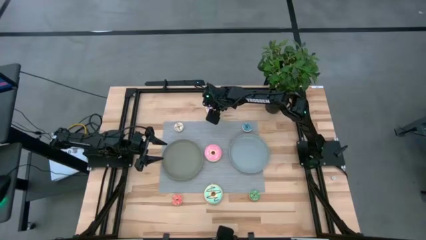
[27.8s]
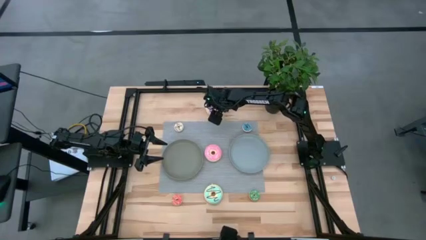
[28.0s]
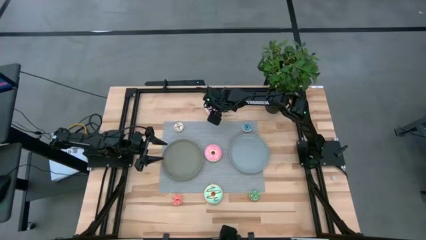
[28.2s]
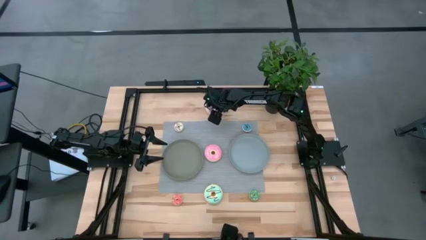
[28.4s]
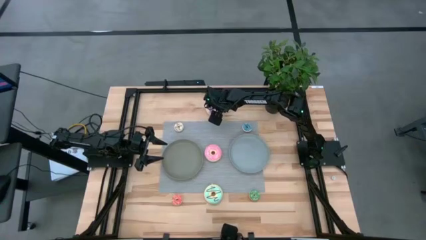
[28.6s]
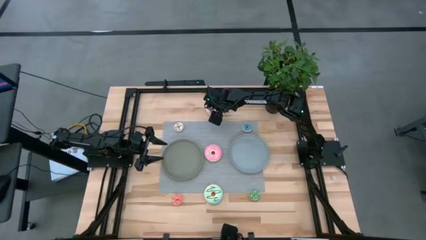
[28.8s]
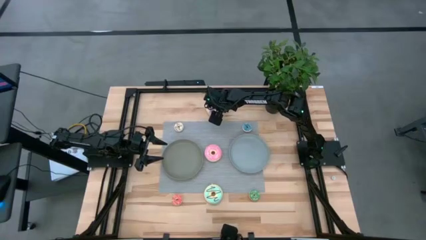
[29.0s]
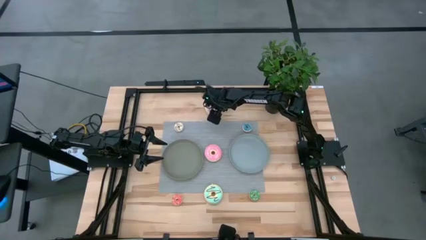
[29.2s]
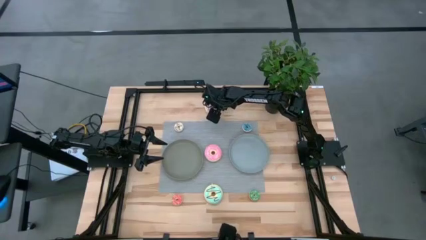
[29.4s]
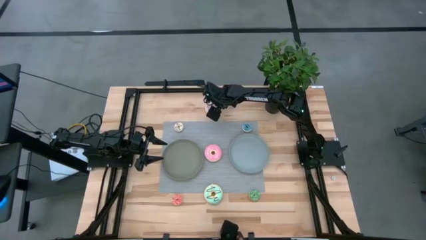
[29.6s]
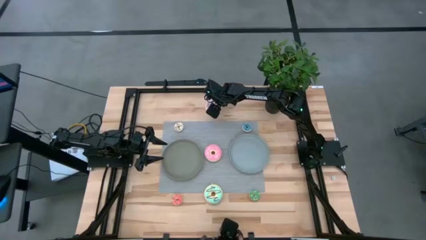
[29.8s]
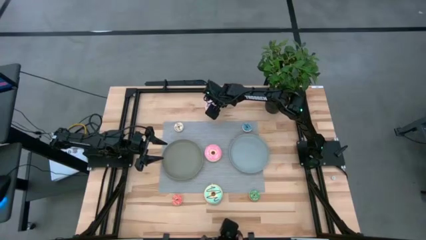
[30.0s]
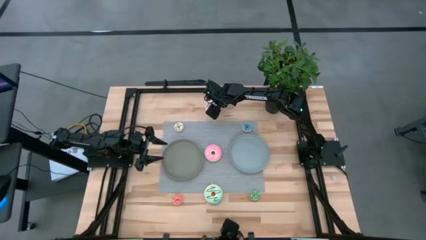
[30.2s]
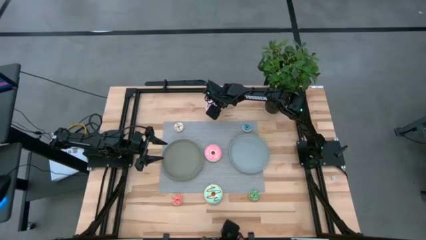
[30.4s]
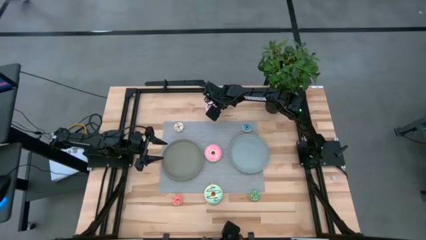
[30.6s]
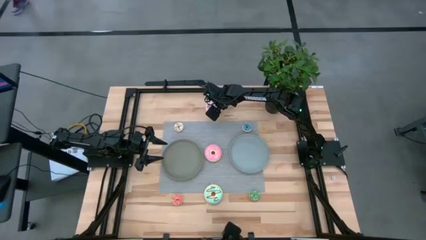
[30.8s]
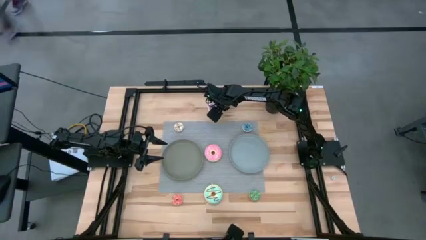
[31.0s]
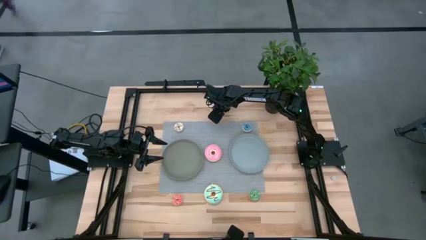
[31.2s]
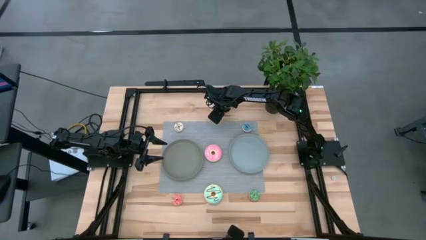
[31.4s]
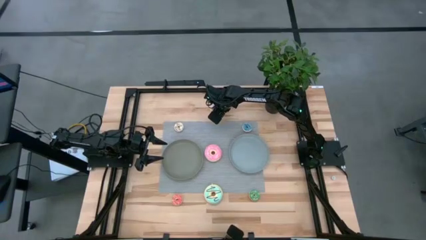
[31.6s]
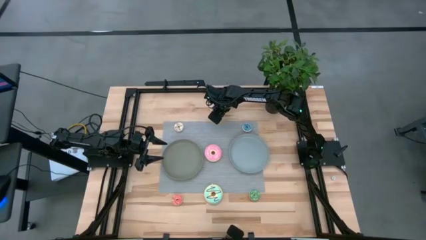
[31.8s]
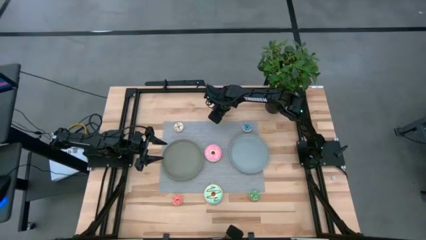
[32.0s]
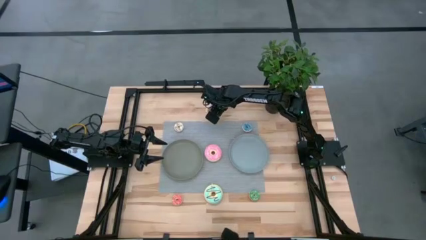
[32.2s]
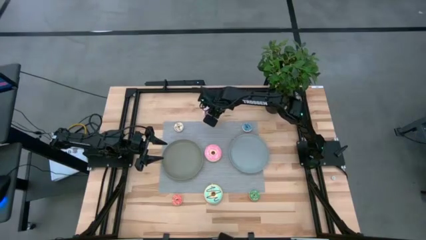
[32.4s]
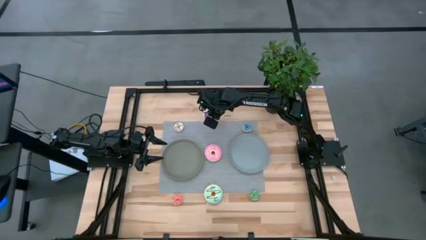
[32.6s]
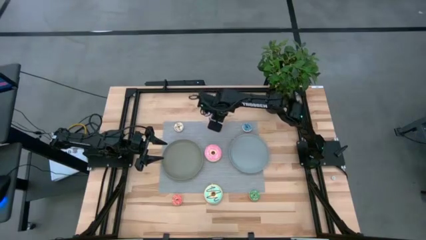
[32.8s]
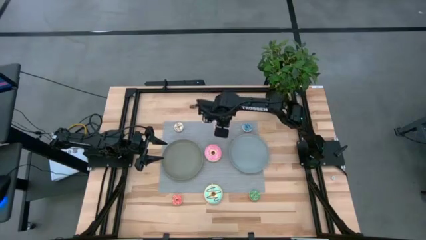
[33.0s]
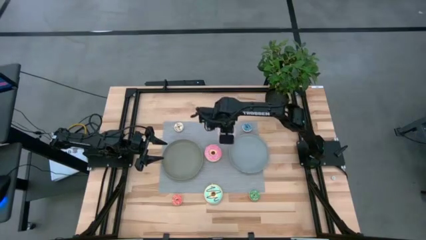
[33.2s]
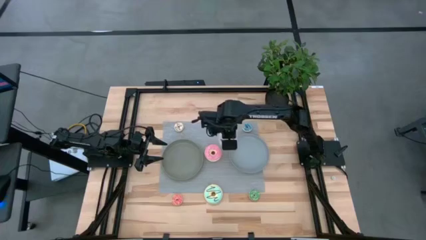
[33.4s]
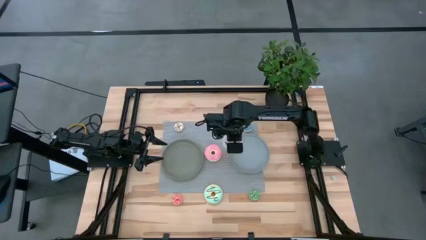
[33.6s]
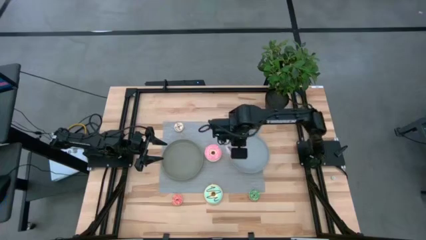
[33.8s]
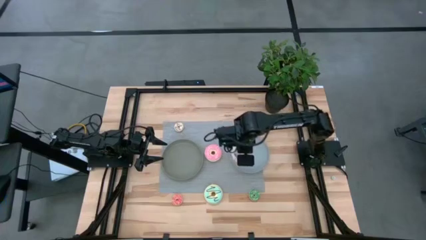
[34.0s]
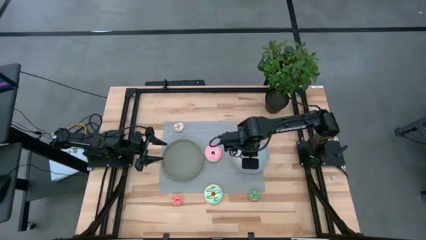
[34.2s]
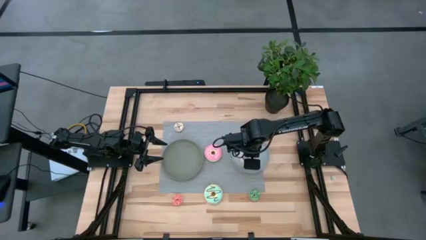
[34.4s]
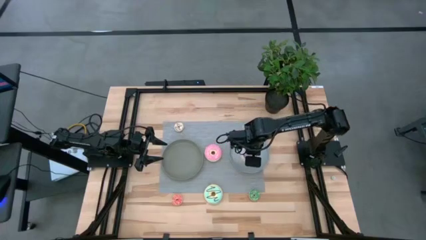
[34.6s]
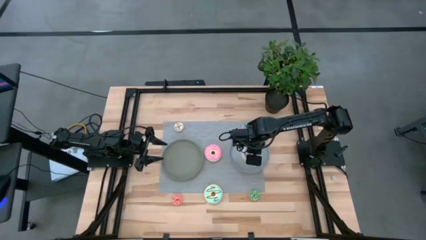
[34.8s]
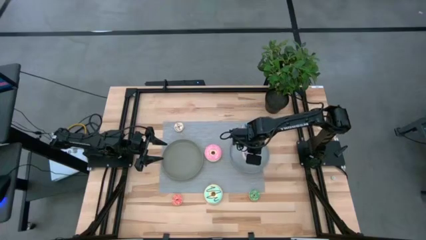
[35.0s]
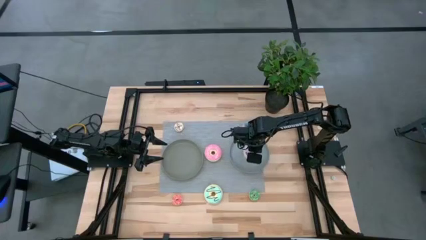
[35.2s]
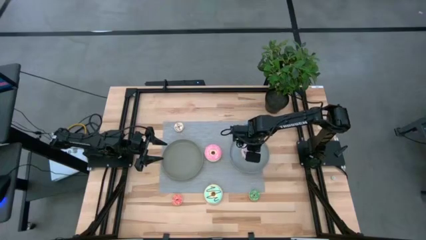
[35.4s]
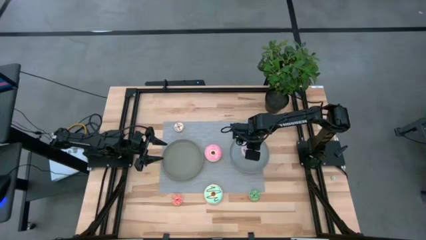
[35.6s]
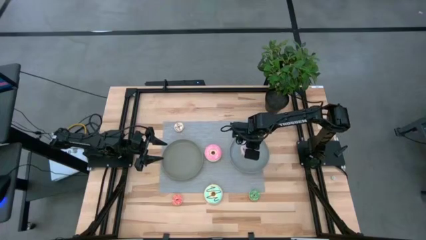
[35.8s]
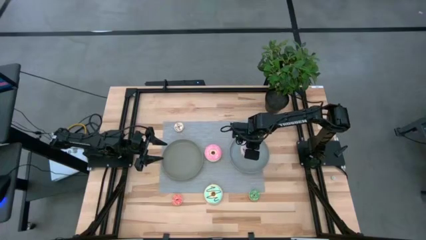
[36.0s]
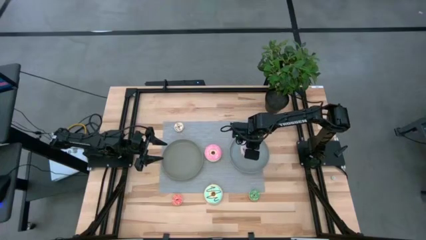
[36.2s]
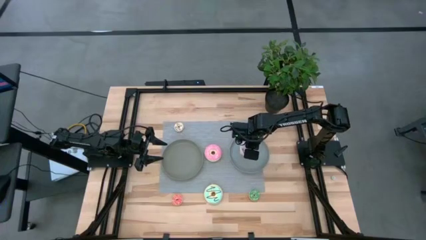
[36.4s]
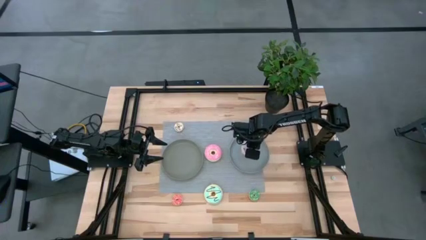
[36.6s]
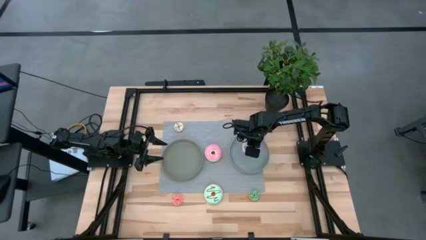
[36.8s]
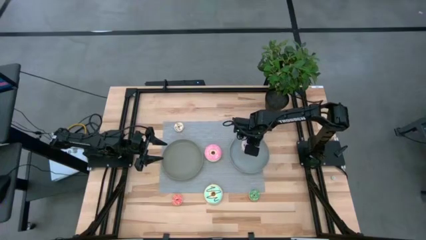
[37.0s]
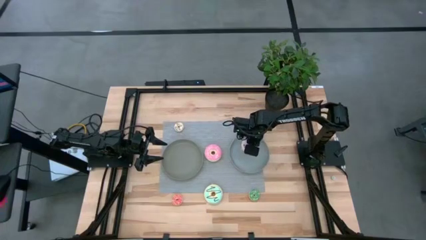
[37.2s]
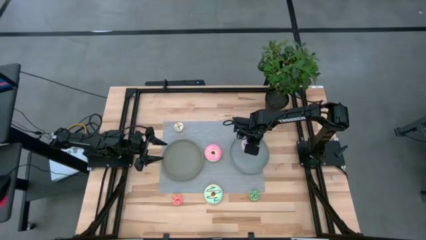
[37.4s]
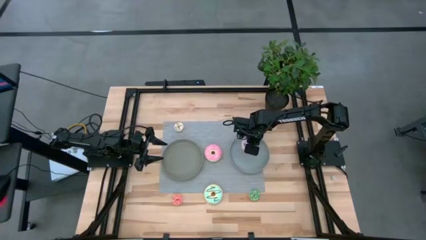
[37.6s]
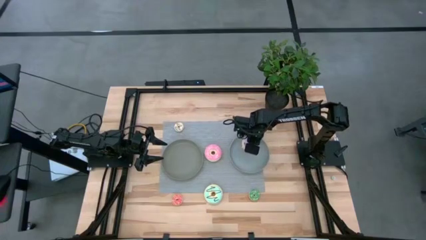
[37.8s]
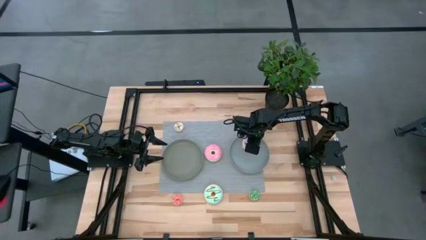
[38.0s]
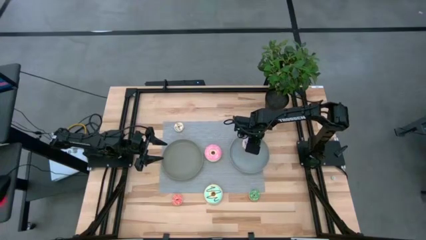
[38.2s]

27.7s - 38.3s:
Task: Pick & Place donuts
Put the big purple donut into the blue plate

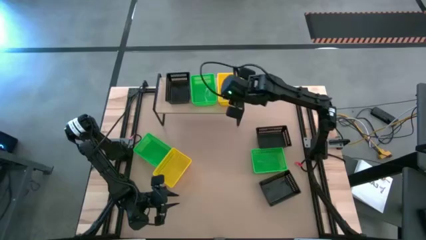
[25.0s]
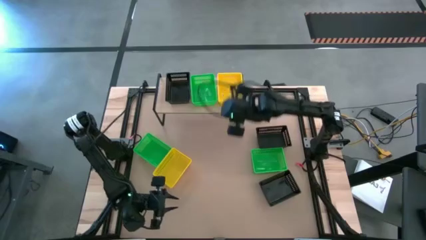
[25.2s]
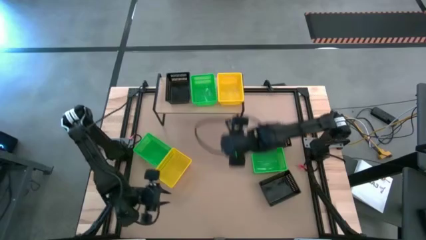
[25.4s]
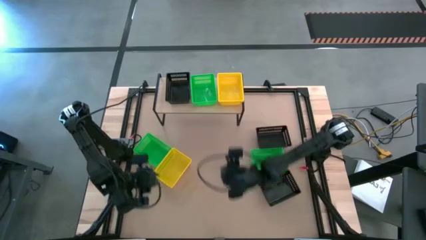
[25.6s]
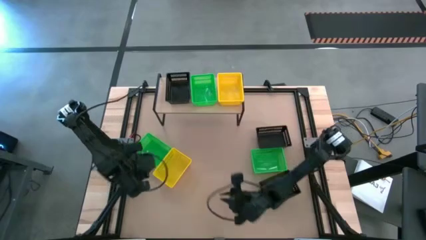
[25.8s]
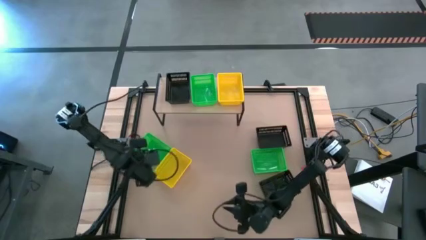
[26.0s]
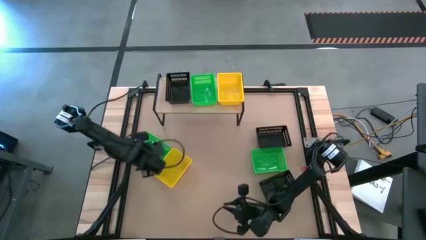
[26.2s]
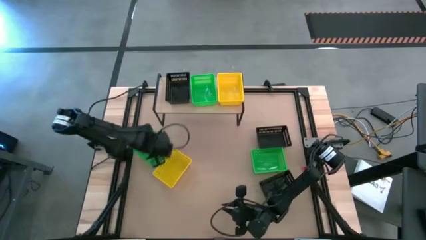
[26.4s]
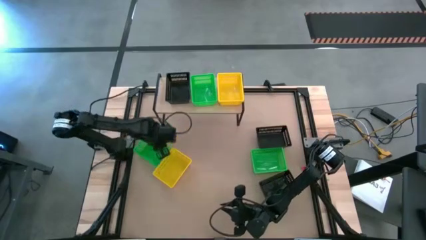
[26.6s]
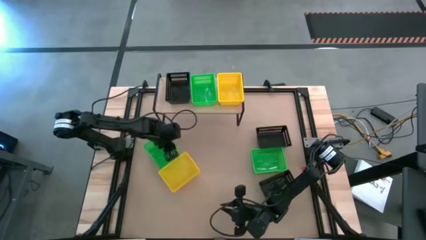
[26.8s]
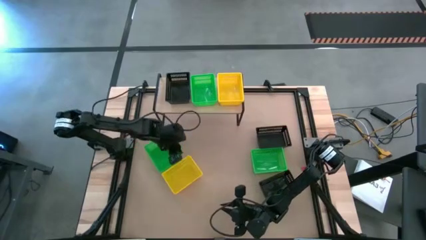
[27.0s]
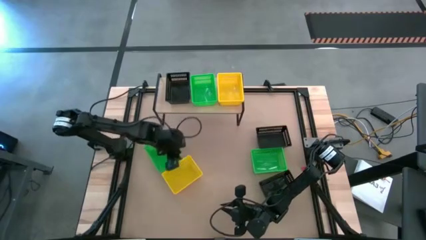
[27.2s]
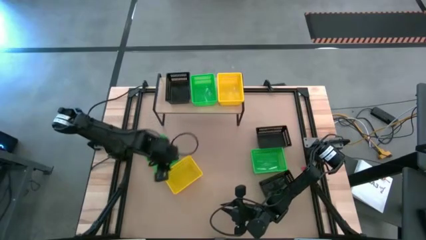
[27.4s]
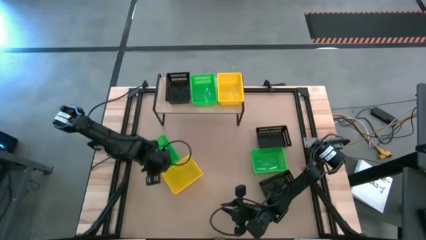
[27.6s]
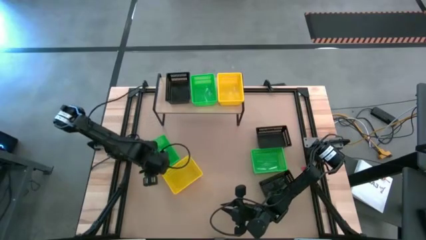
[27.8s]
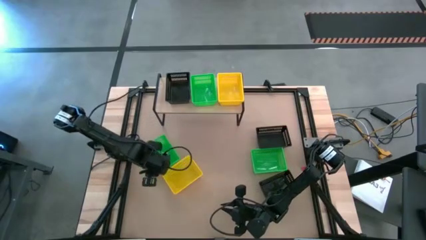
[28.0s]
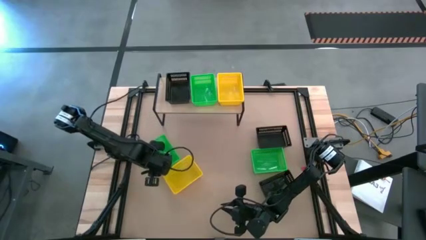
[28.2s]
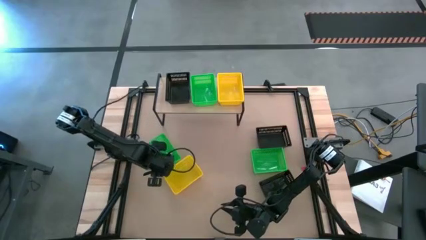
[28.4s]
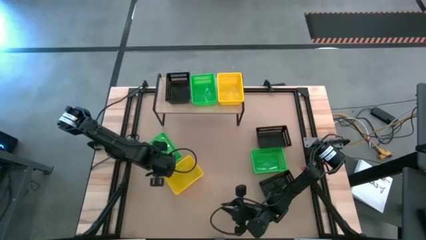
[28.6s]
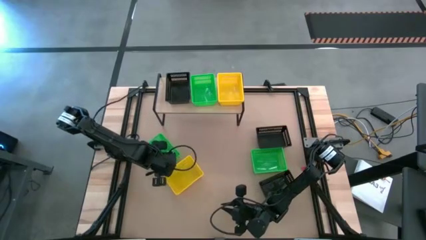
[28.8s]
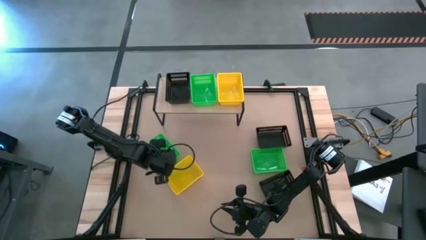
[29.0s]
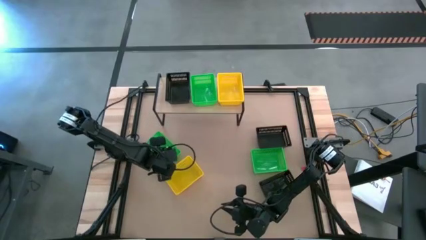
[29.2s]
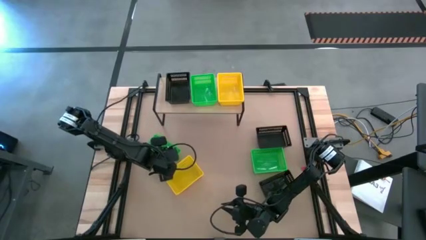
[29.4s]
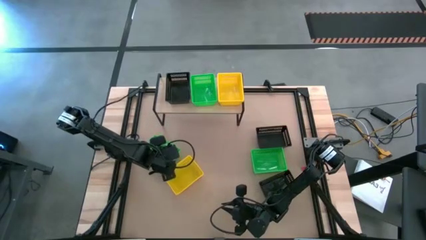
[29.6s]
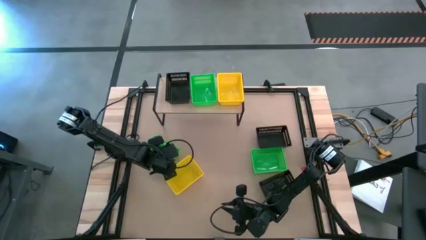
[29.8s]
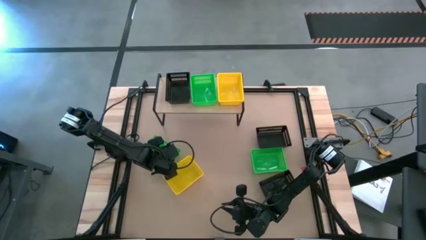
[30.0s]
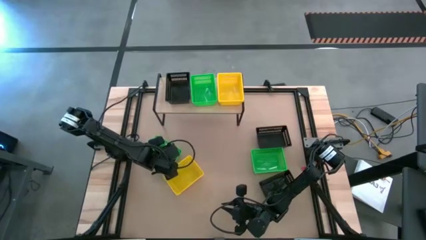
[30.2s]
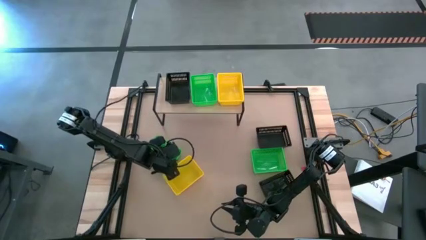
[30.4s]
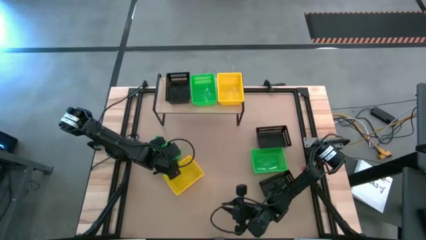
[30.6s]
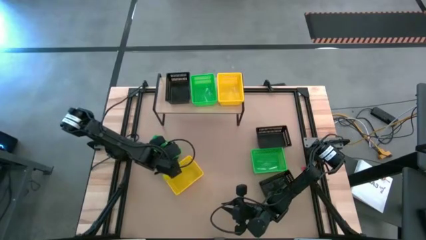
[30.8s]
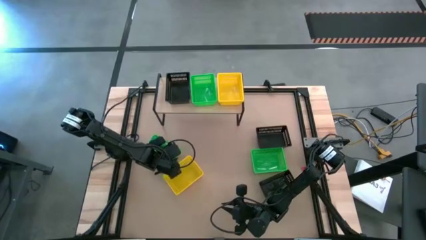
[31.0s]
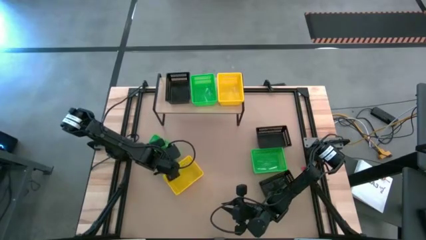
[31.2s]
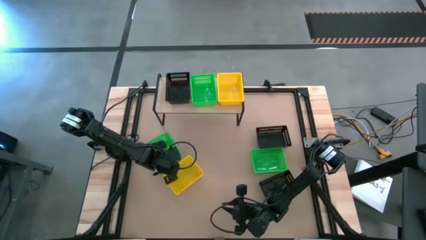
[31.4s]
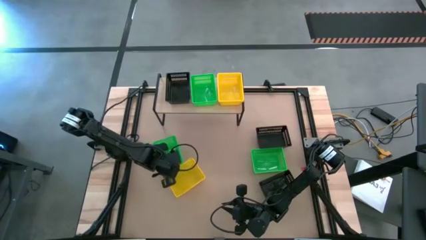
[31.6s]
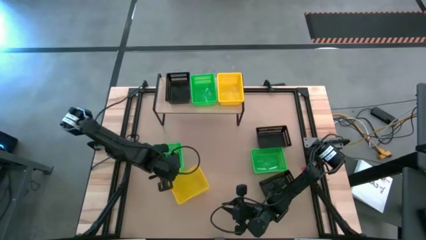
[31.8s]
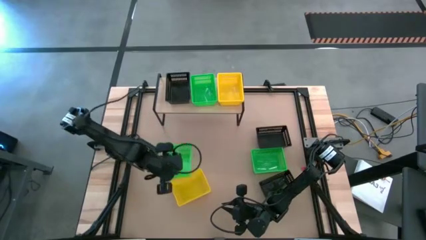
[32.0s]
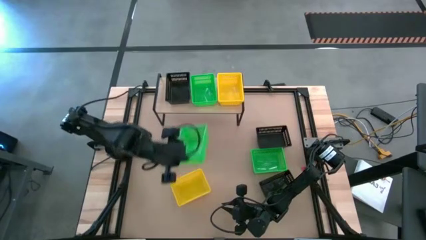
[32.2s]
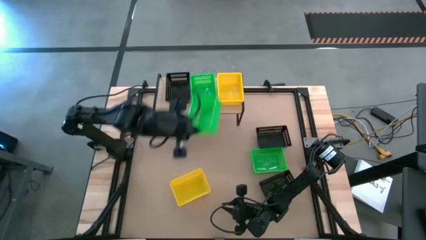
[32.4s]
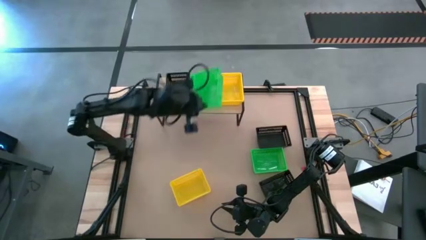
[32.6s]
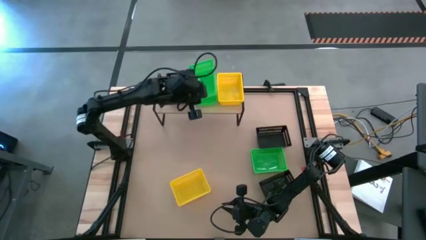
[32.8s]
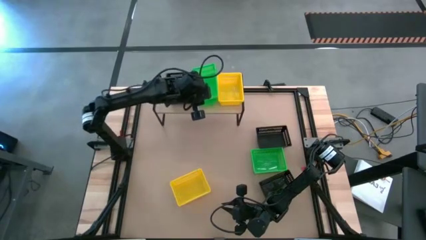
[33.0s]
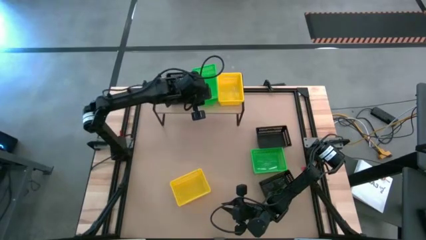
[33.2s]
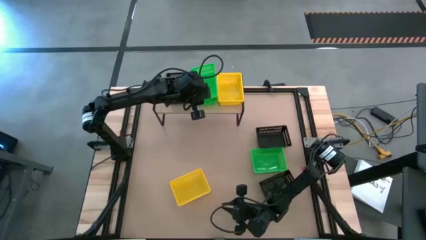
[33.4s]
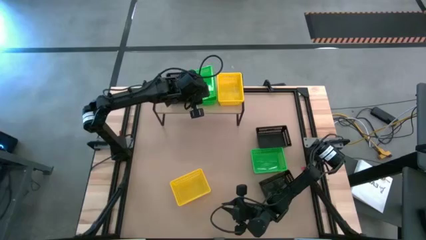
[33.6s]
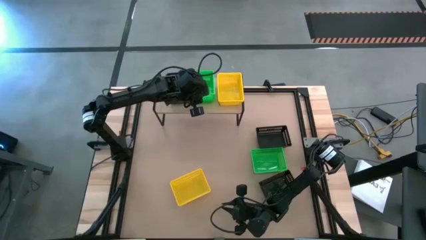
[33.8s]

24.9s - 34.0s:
Task: Stack baskets on shelf by color
Stack the left green bin on top of the green bin on the shelf
